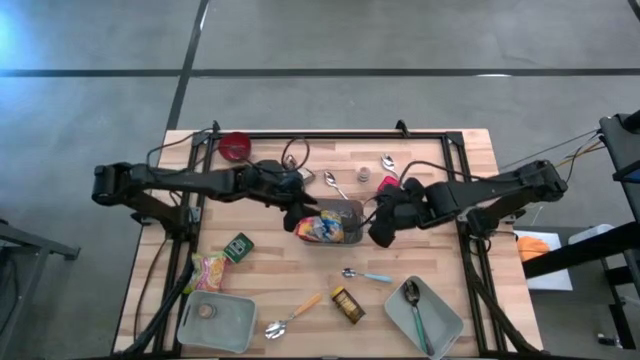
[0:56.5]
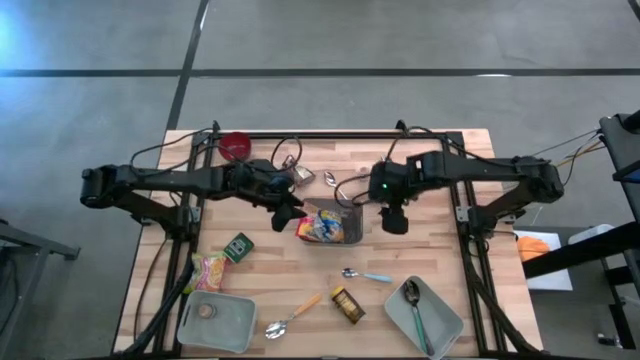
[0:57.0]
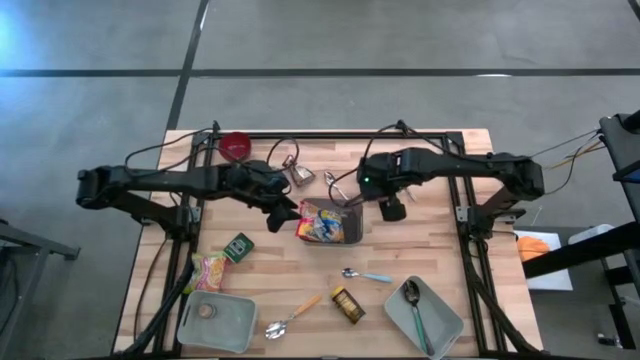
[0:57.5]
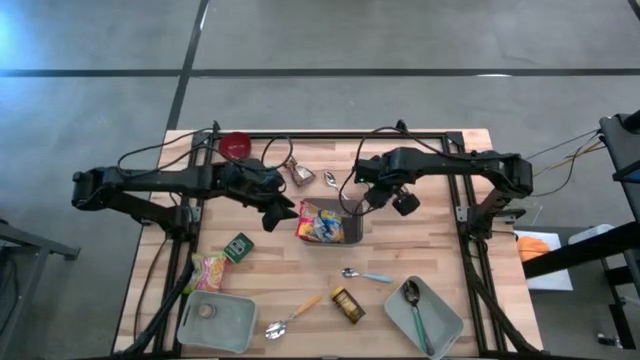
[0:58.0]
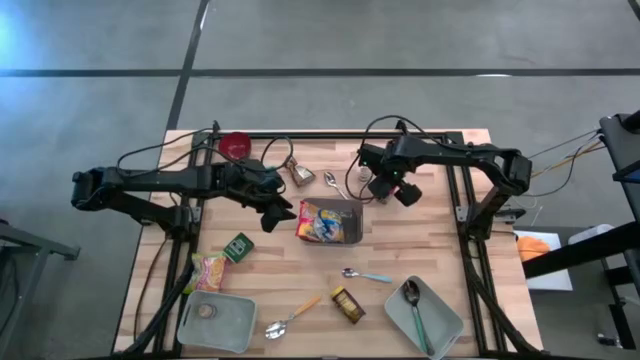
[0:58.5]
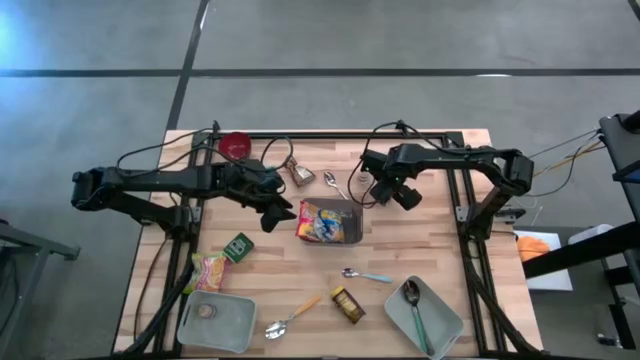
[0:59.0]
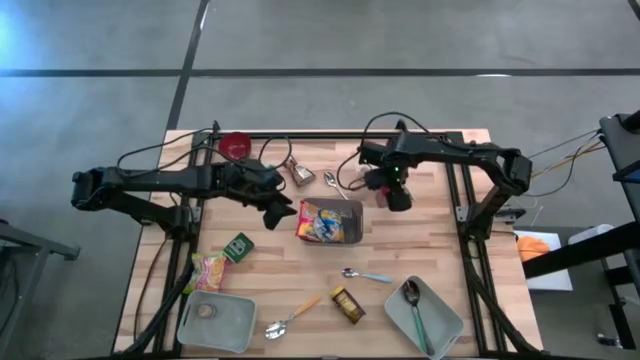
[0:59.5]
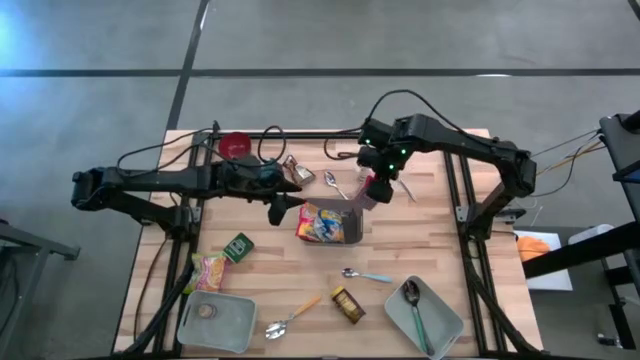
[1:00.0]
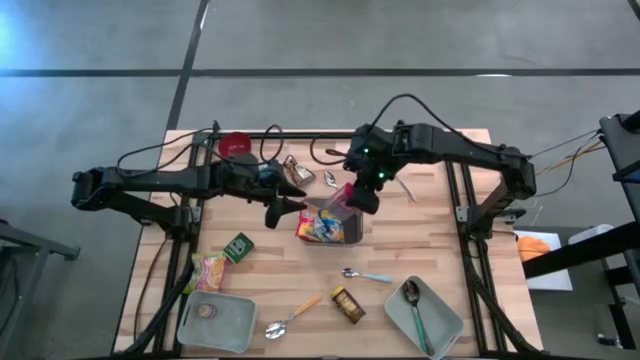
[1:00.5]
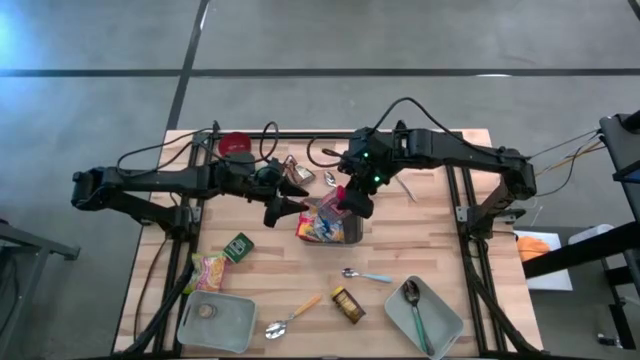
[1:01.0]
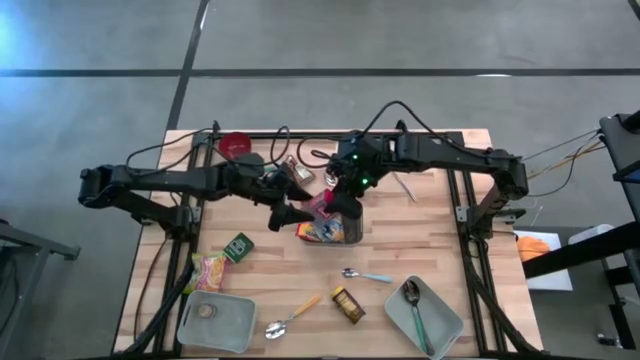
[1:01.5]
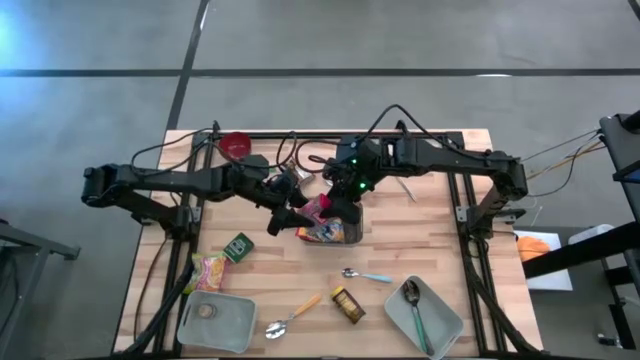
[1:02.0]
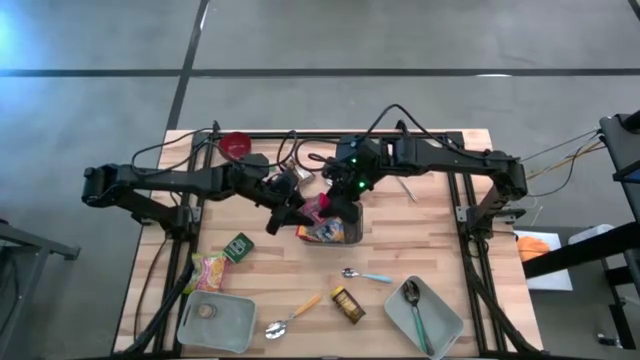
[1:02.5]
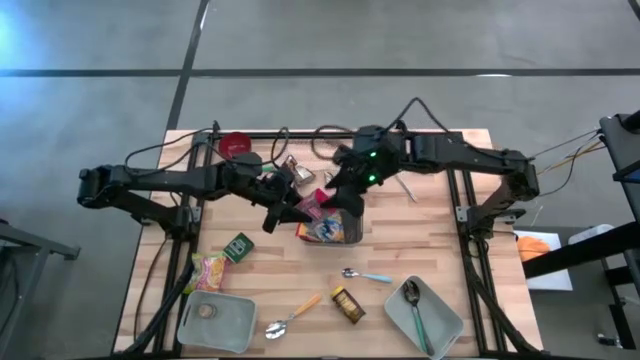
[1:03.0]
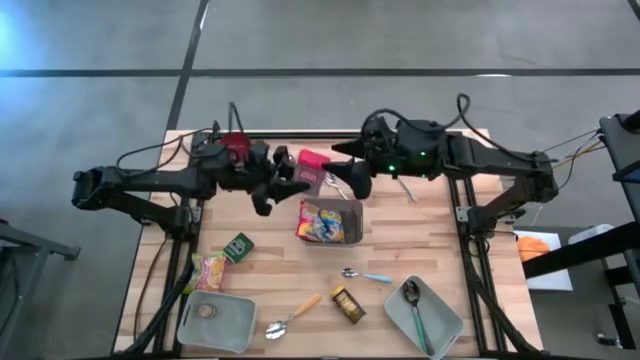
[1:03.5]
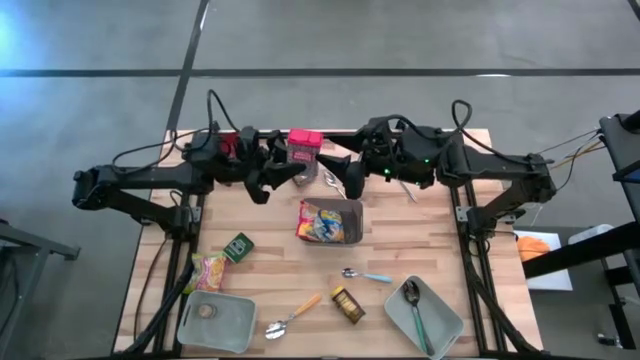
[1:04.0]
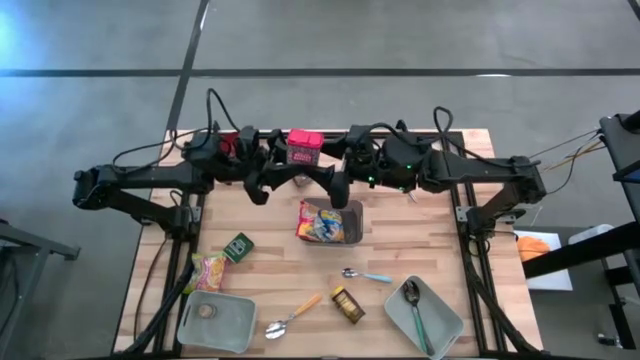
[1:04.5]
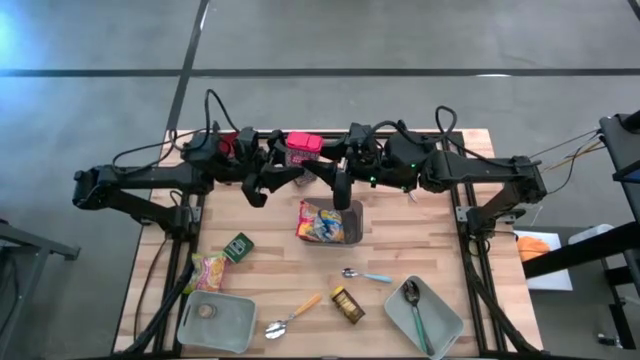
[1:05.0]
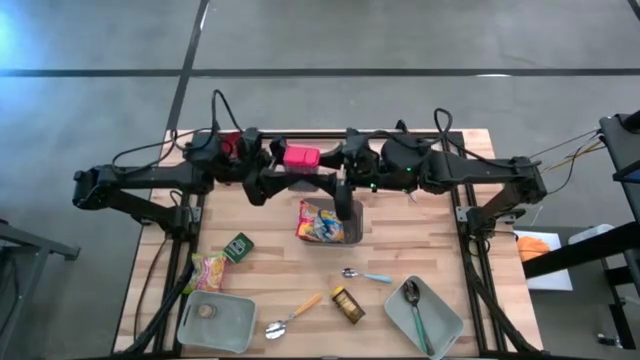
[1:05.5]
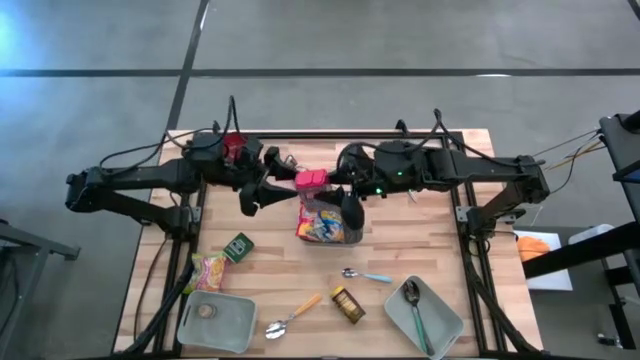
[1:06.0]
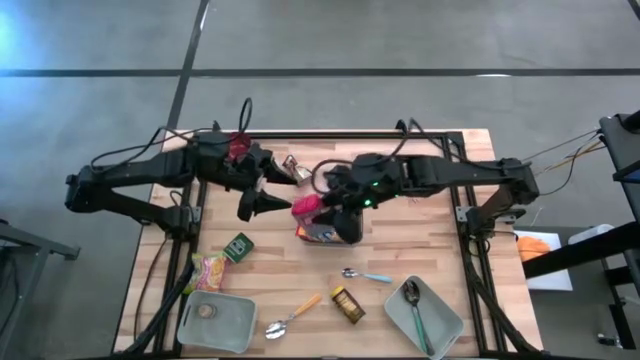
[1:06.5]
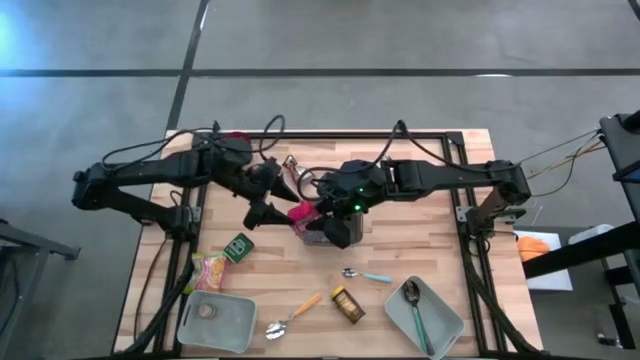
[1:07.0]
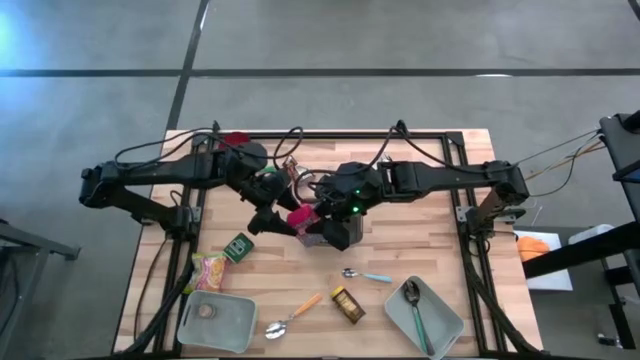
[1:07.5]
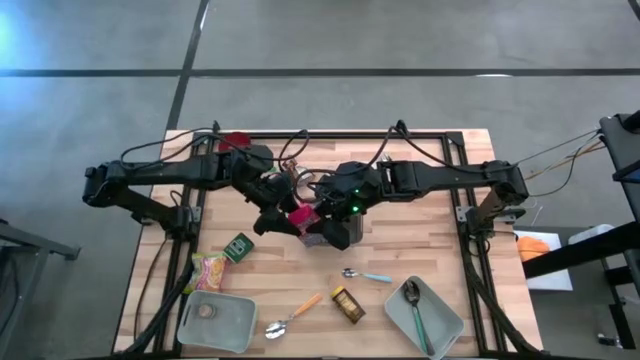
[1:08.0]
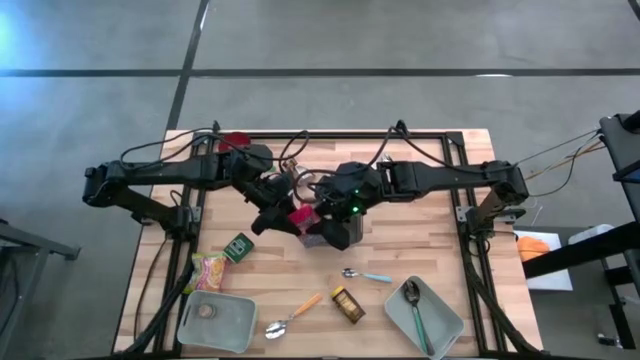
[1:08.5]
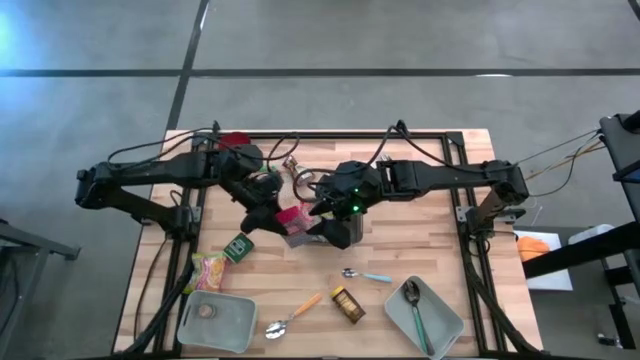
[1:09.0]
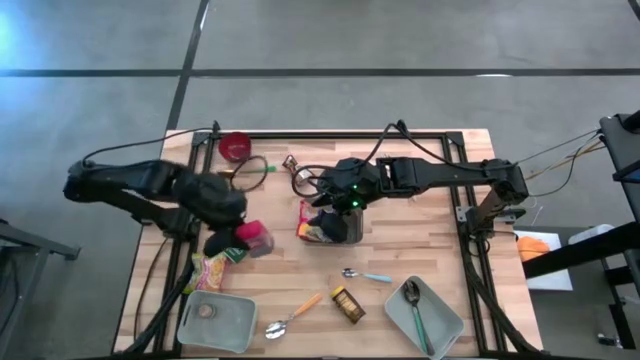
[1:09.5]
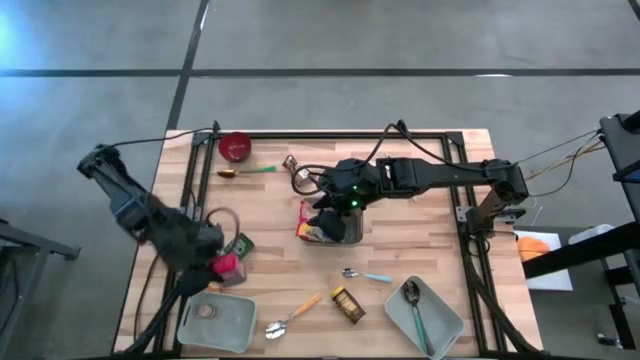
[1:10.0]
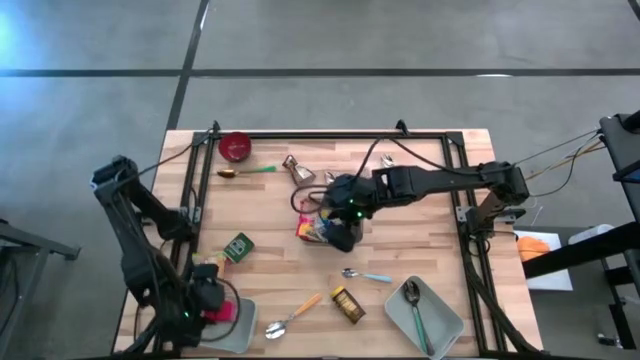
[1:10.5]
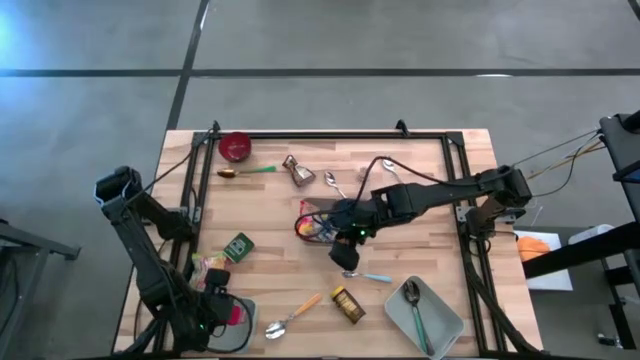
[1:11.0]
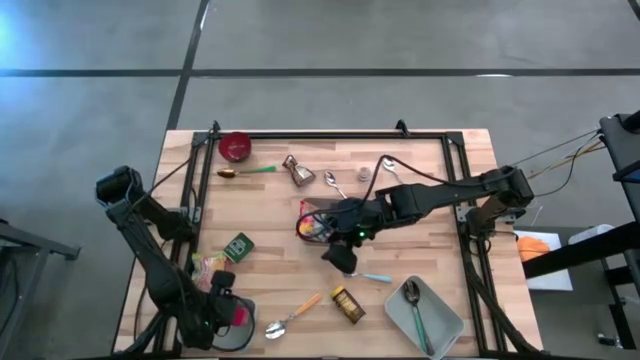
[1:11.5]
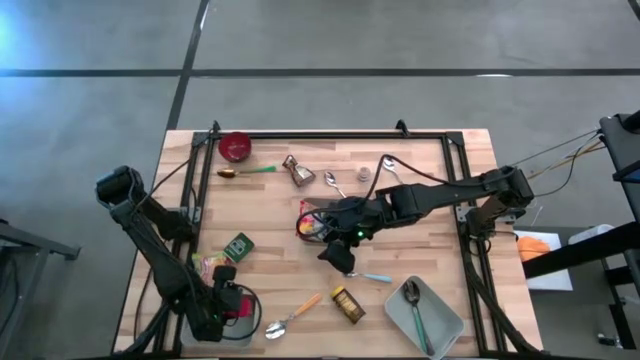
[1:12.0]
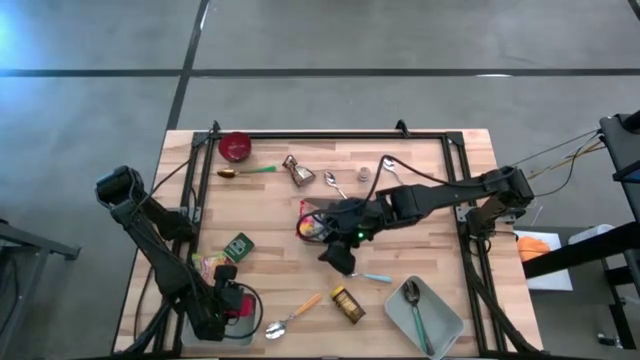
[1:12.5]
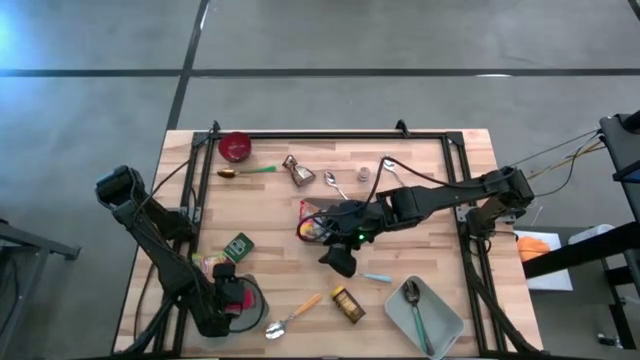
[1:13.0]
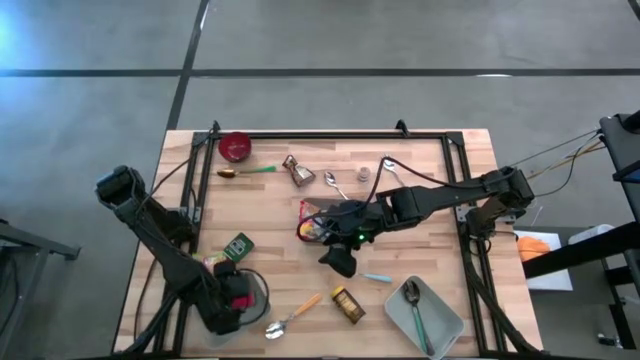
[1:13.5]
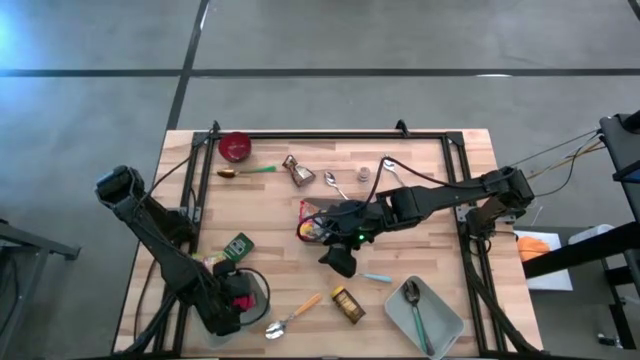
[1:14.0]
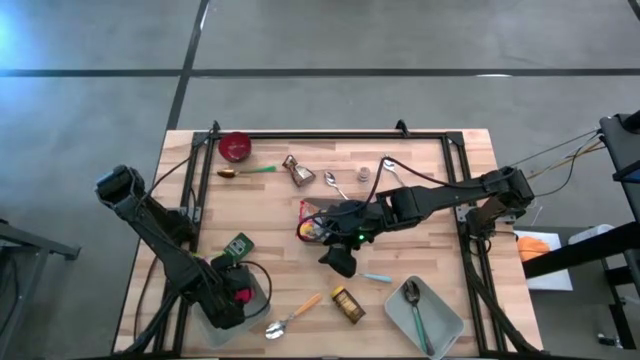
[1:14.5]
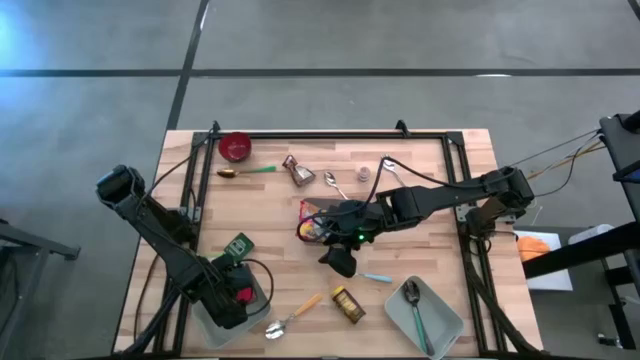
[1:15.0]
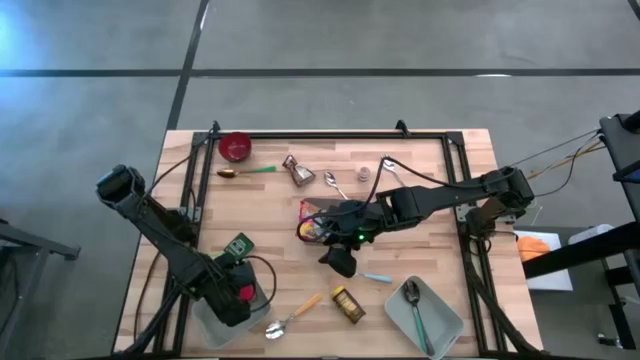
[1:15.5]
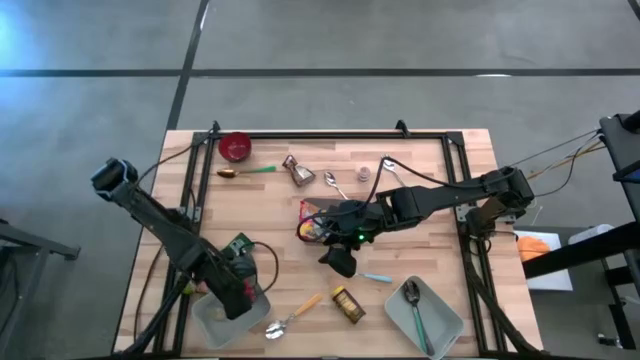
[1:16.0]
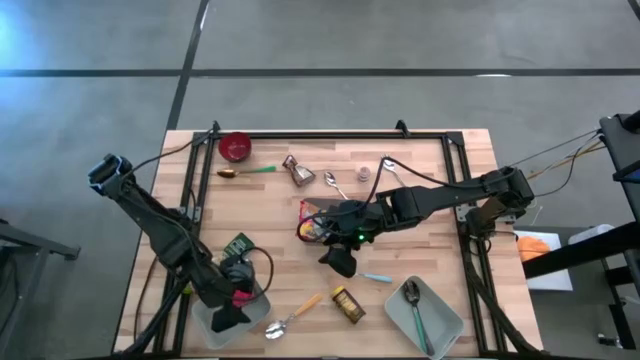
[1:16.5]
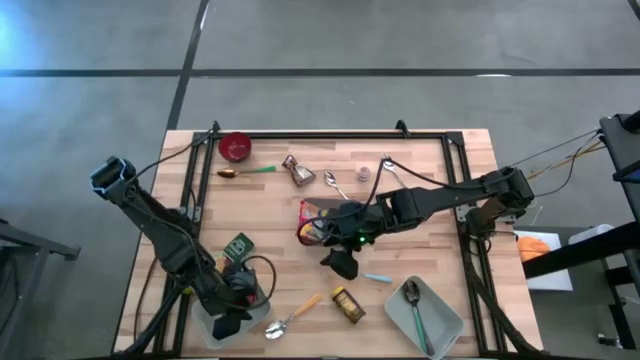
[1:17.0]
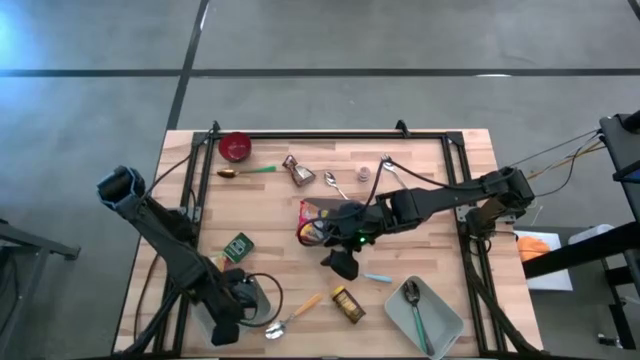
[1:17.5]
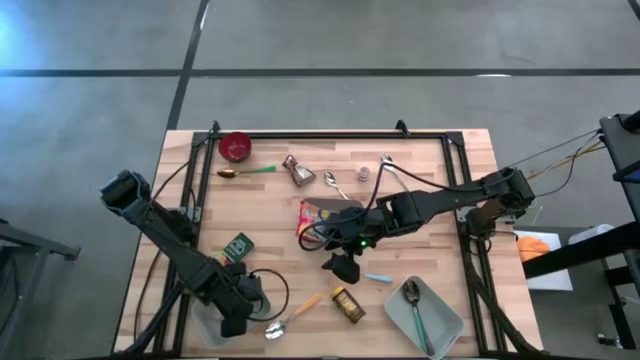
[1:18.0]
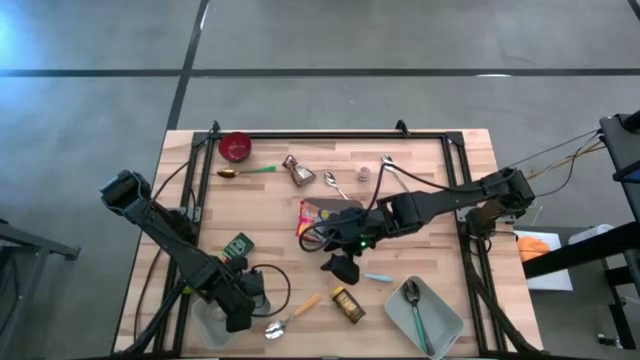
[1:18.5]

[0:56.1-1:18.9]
Put the red spice can into the left grey bin
